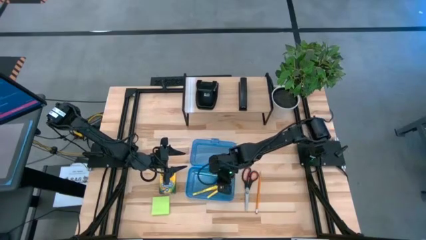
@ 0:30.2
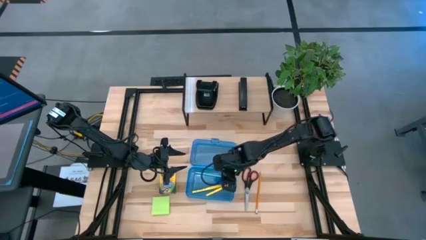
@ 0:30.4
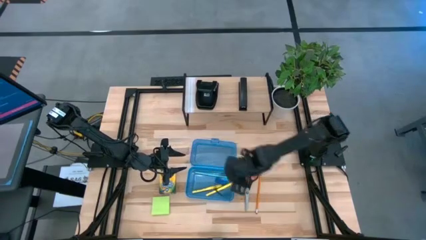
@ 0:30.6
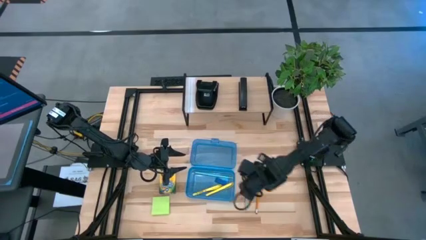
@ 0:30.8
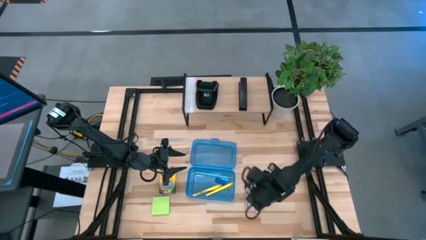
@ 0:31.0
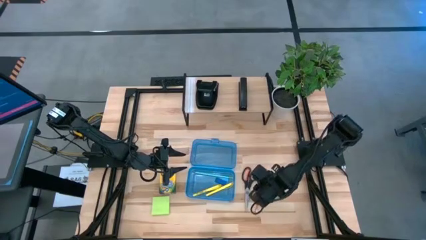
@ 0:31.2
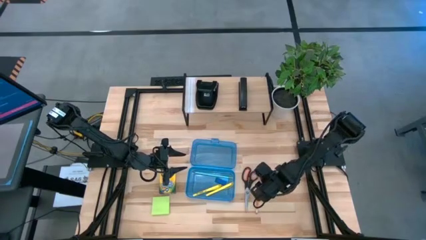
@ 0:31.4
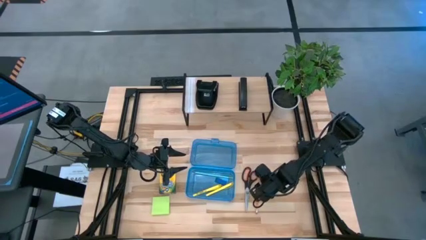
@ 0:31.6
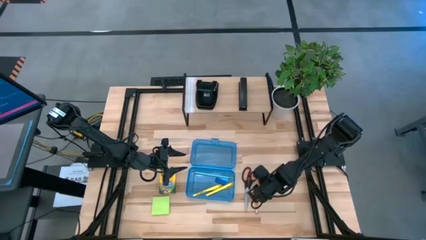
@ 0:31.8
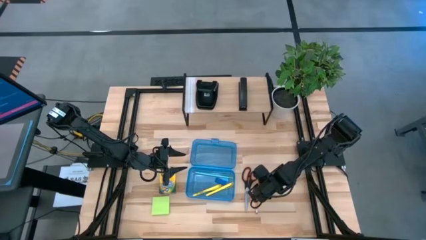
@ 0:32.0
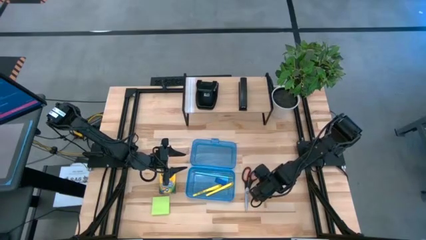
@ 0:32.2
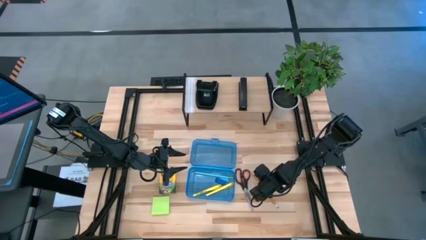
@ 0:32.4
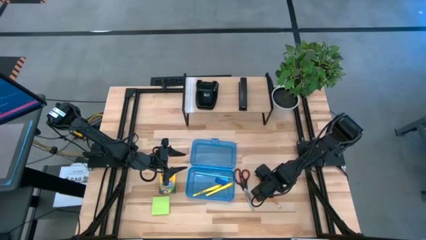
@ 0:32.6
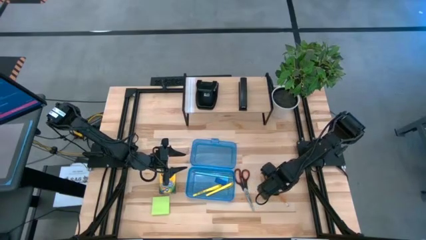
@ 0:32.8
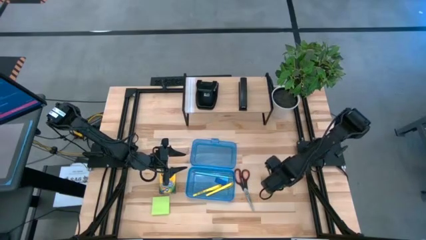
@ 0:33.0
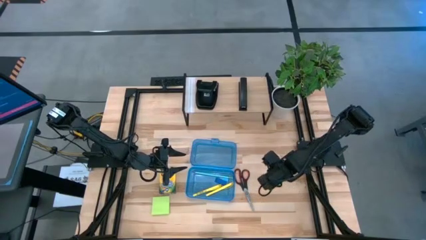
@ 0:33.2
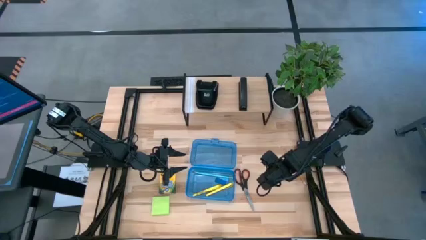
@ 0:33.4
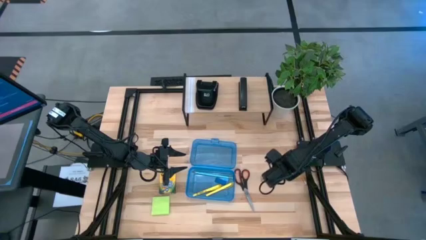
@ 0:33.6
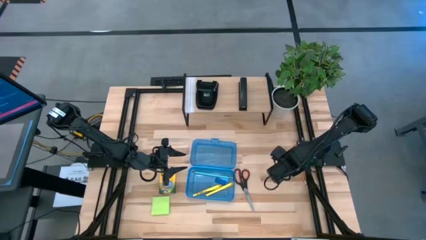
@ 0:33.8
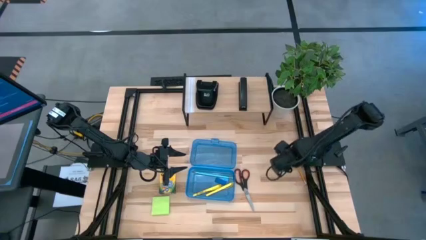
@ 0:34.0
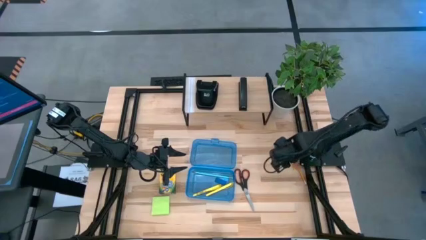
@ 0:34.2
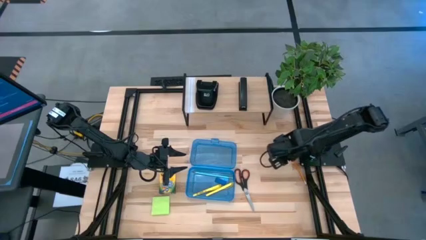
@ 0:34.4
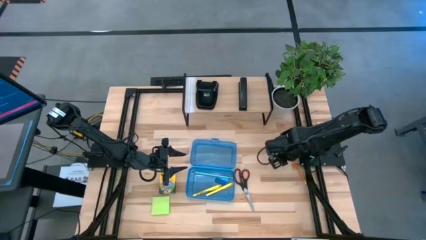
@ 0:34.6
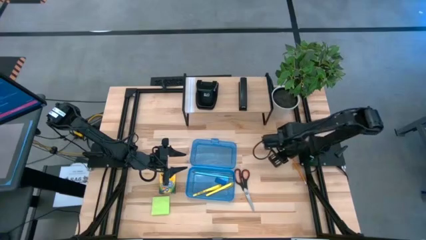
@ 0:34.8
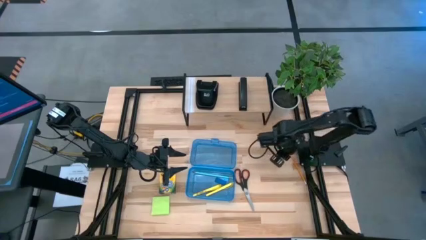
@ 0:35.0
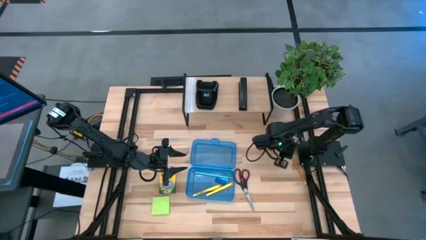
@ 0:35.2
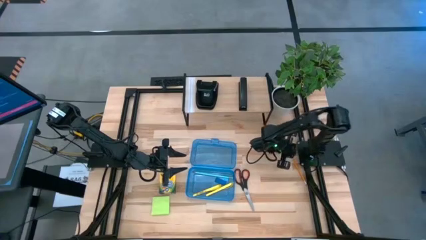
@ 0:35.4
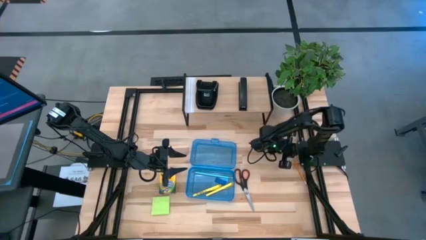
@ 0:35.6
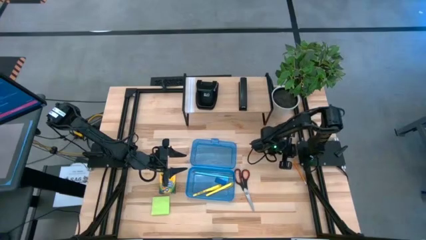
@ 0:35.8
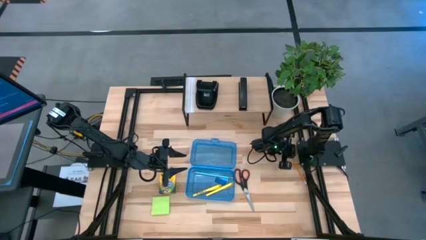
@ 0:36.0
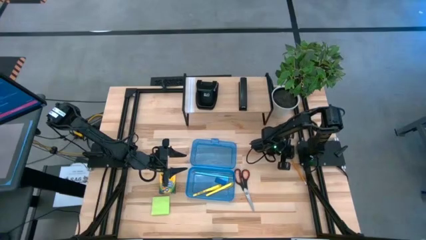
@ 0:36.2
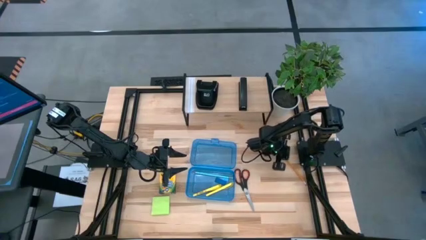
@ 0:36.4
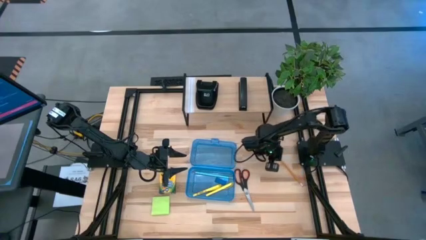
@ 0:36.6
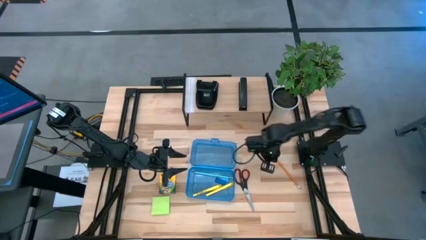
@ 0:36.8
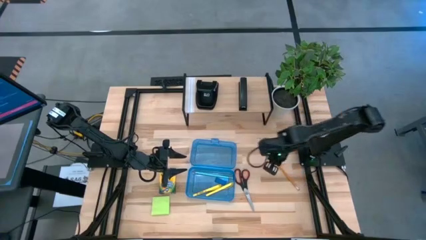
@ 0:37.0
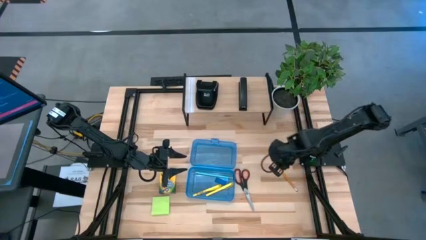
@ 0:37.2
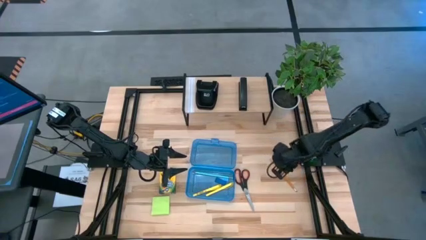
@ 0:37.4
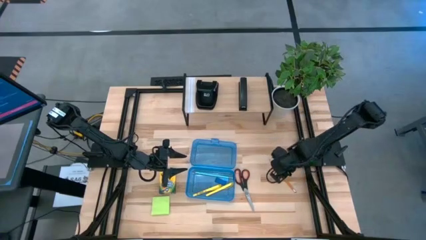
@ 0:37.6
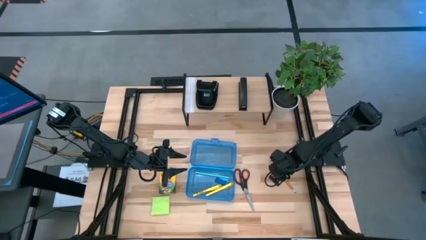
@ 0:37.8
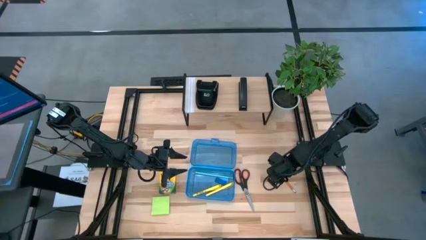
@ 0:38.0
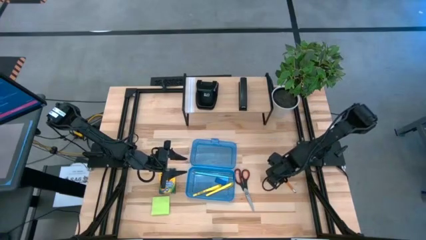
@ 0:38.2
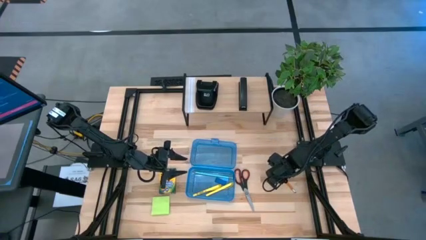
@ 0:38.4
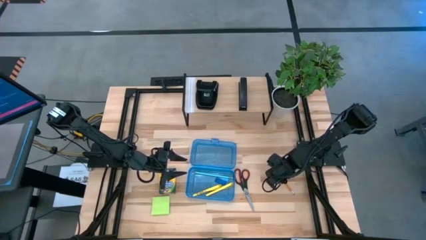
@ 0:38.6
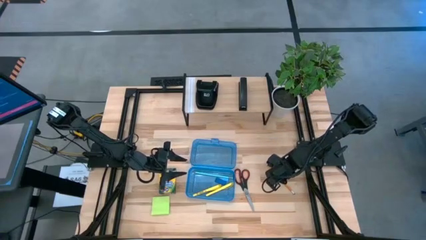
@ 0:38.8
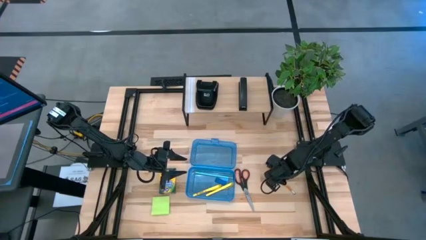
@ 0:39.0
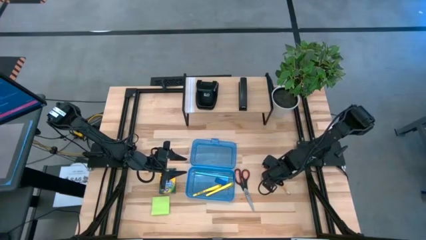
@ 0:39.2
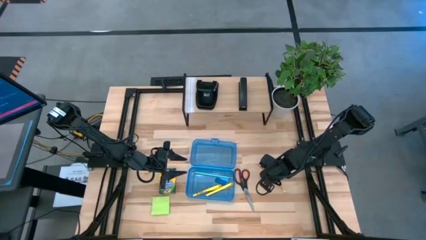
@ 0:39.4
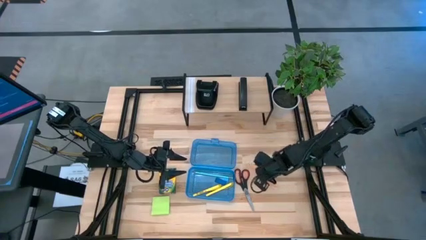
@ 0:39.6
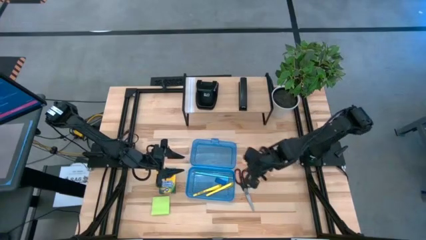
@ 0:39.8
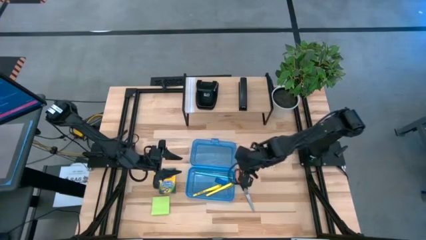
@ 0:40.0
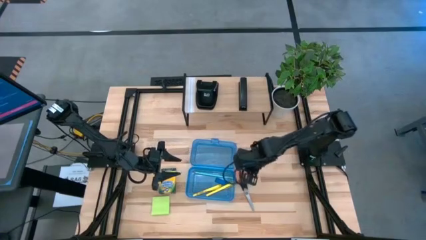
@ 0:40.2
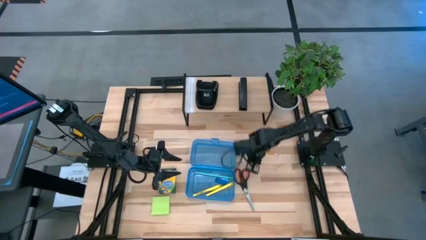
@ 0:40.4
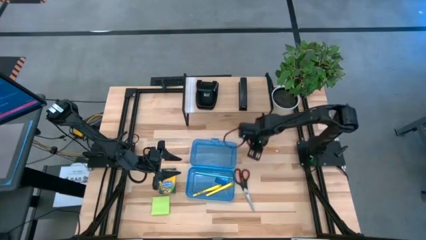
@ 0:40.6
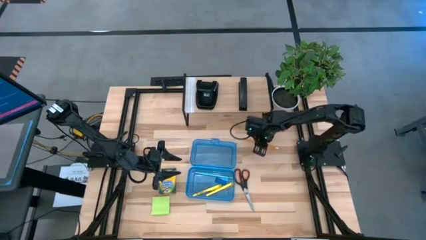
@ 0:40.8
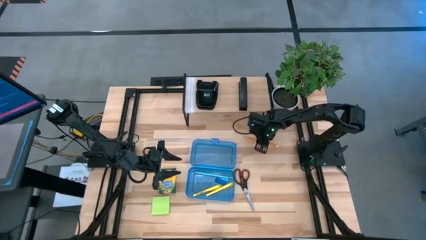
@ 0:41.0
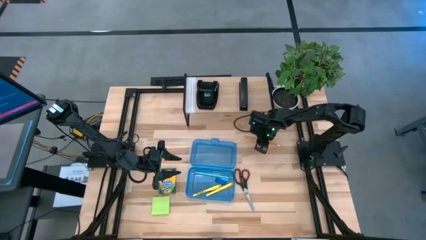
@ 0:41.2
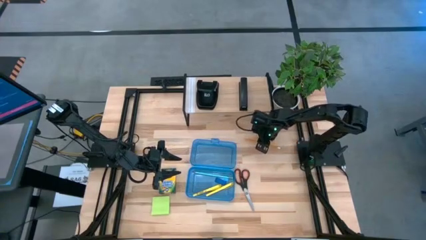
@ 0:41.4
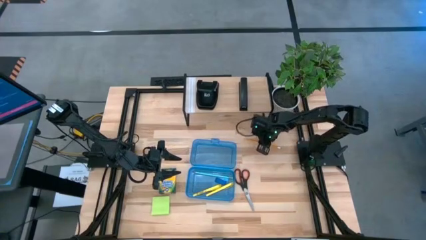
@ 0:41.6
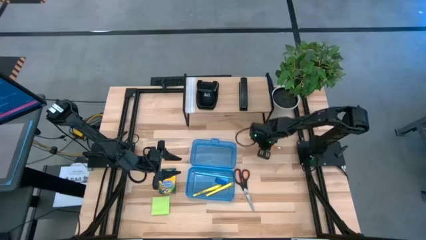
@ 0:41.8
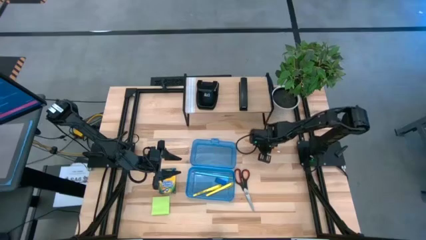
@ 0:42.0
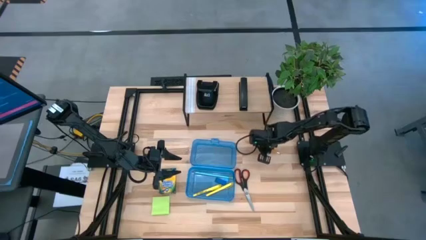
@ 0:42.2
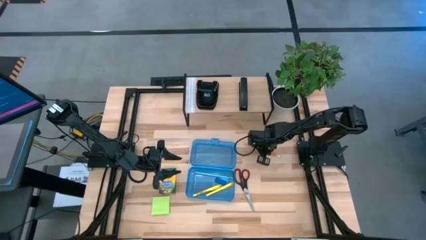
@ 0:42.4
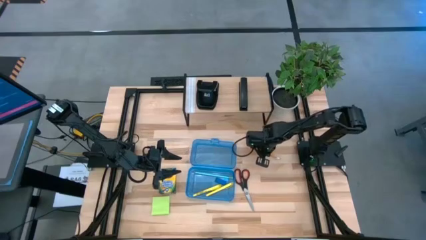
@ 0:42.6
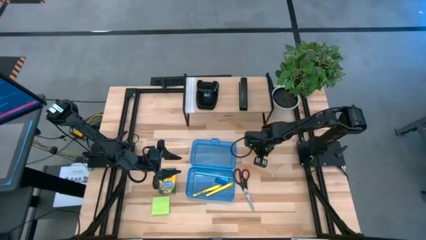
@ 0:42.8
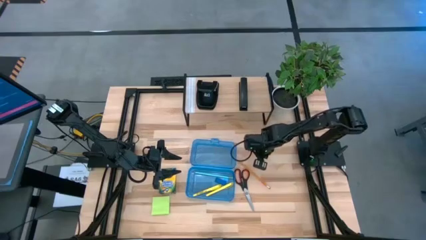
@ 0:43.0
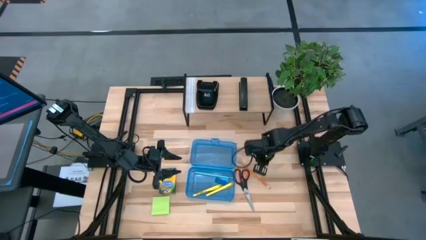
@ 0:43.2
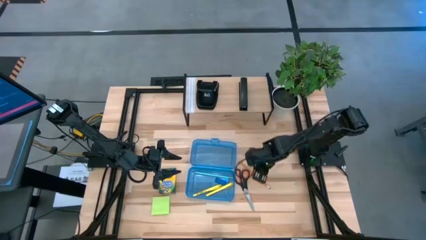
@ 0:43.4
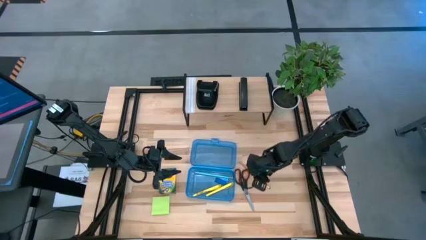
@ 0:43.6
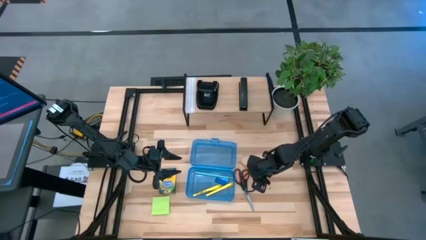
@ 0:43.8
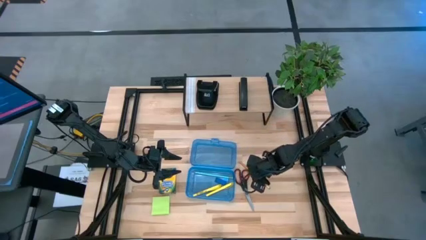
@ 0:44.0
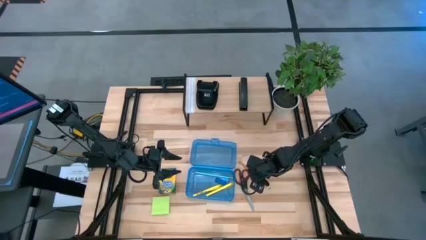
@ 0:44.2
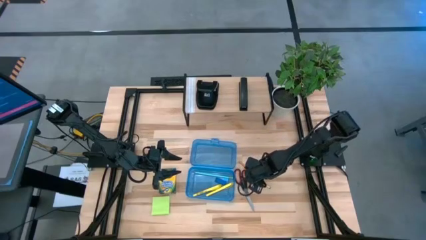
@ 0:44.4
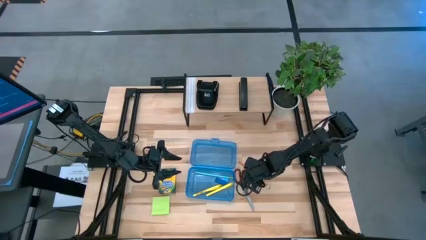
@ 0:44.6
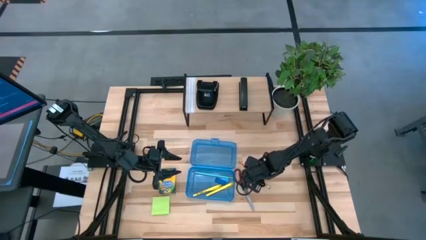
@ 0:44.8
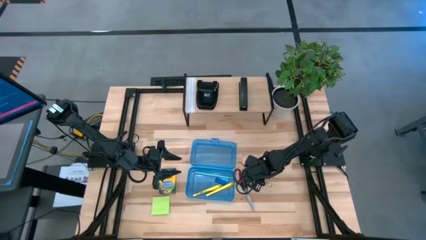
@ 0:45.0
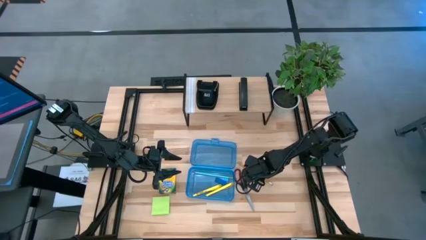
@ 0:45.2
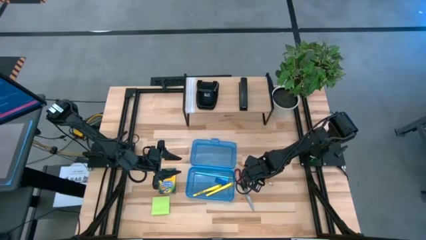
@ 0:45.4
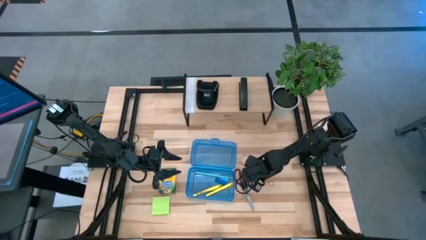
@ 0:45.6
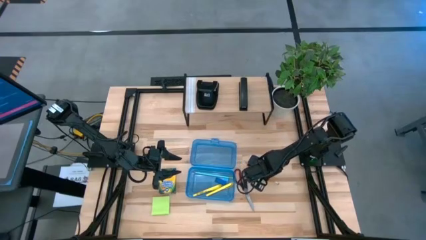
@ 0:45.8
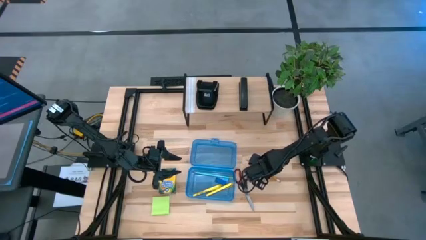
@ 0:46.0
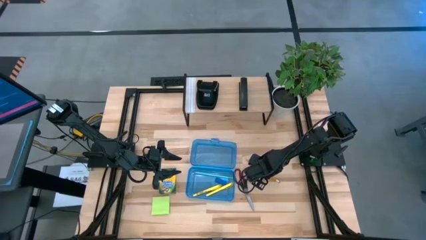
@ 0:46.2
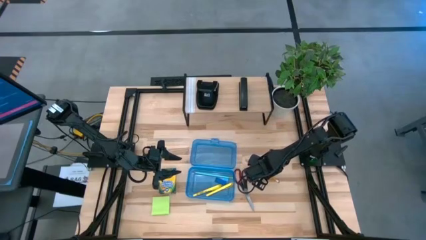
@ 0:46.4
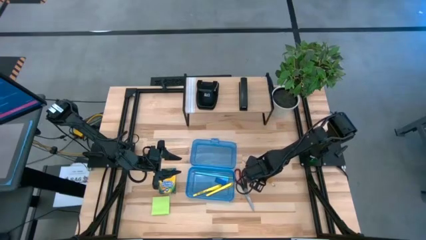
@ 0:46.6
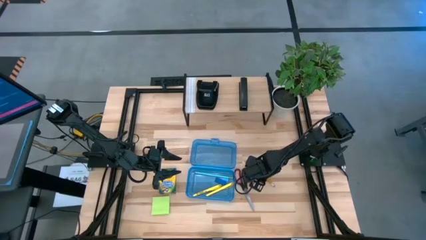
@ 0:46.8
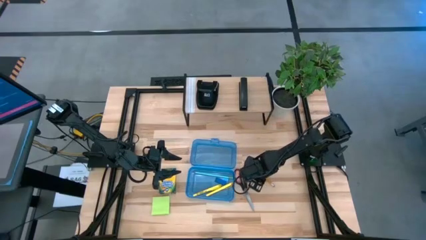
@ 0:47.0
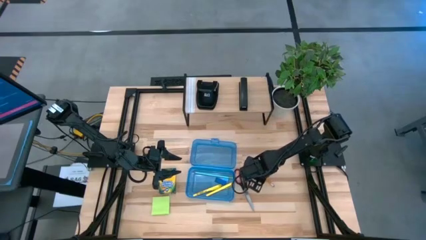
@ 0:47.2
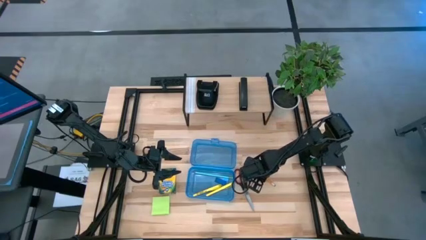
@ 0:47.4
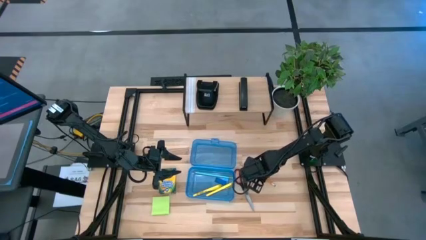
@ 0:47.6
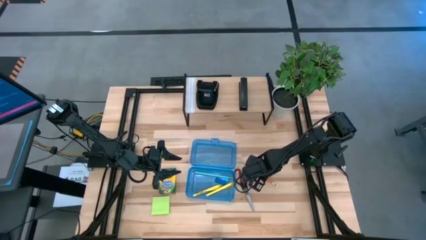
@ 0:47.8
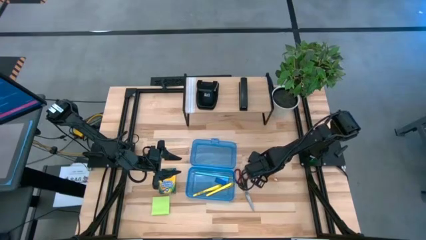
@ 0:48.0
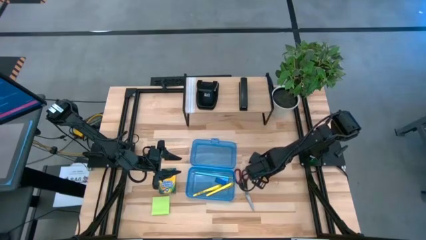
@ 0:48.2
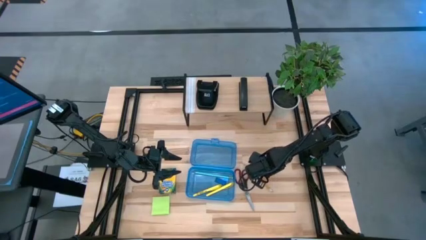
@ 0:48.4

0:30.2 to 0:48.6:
Task: Pack school essentials
Put the orange pencil into the blue supply box
